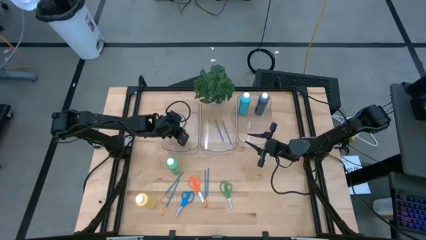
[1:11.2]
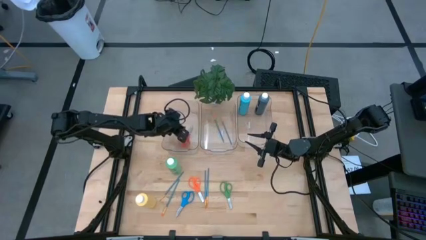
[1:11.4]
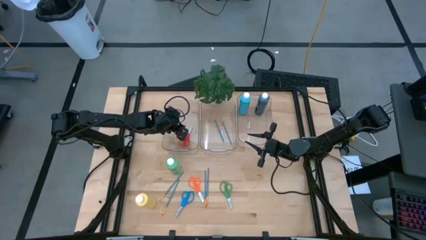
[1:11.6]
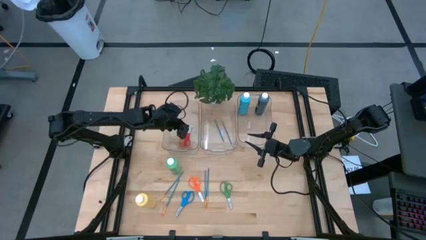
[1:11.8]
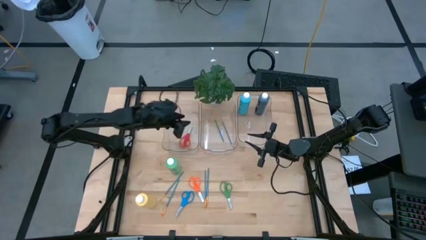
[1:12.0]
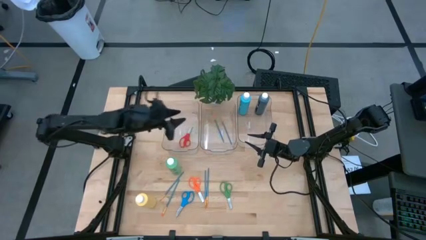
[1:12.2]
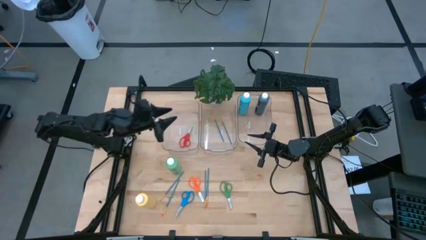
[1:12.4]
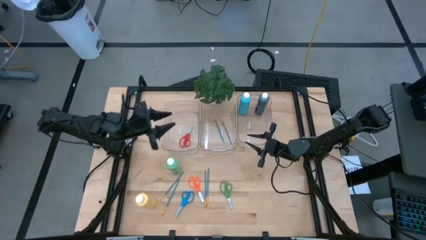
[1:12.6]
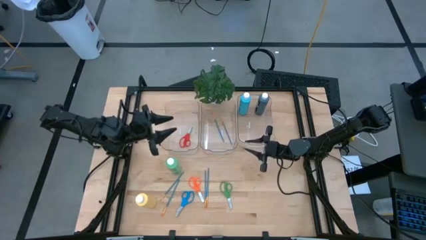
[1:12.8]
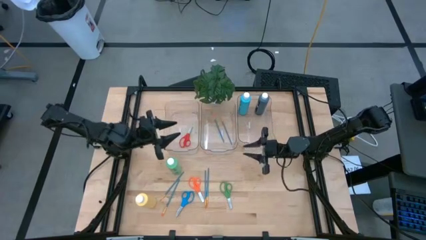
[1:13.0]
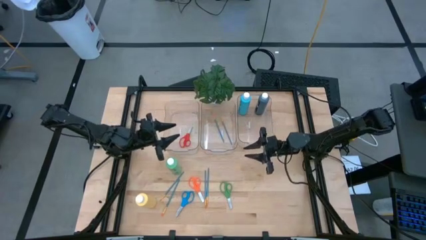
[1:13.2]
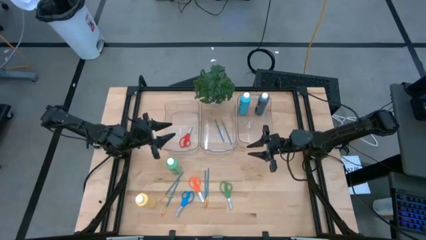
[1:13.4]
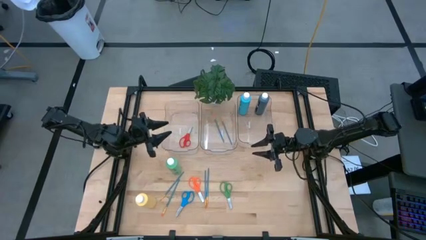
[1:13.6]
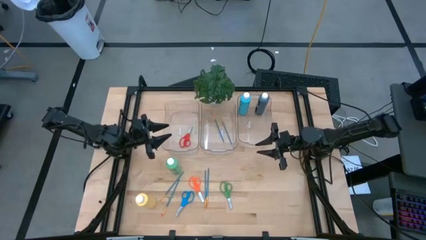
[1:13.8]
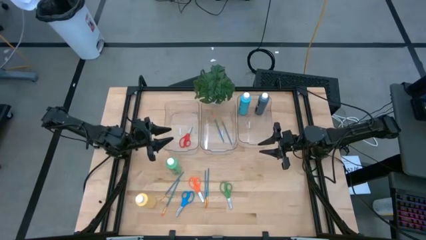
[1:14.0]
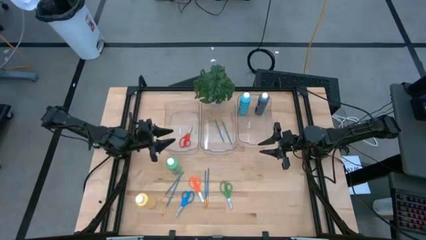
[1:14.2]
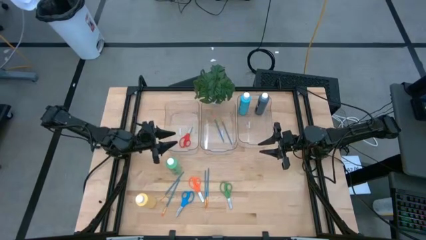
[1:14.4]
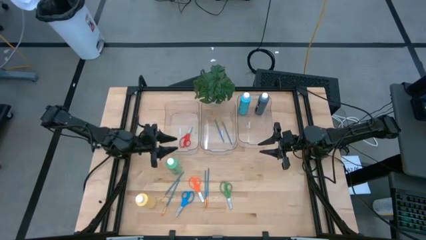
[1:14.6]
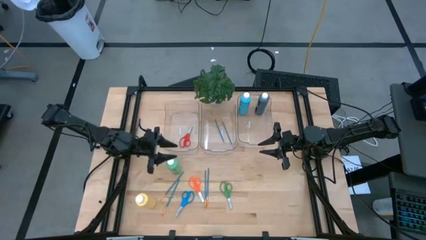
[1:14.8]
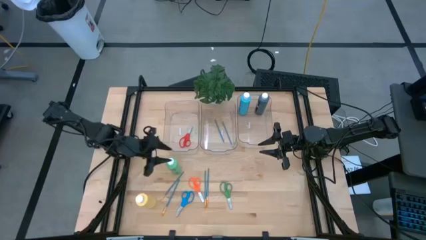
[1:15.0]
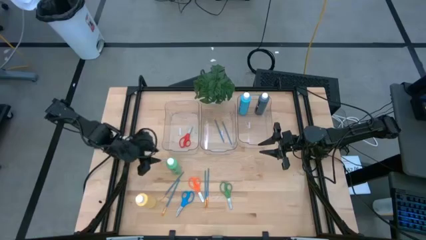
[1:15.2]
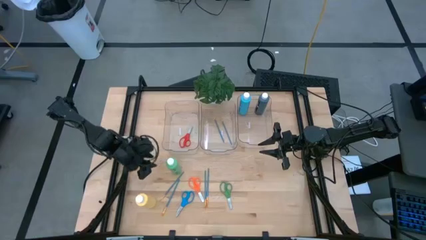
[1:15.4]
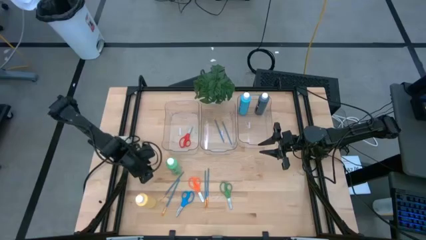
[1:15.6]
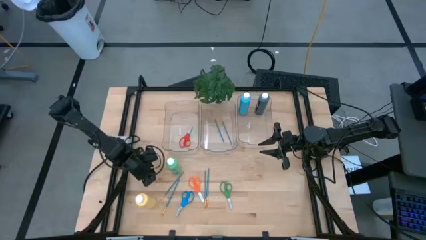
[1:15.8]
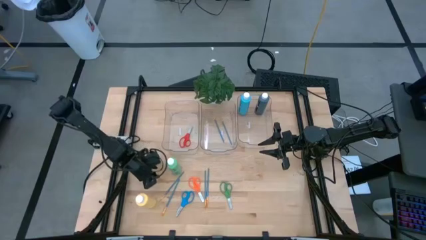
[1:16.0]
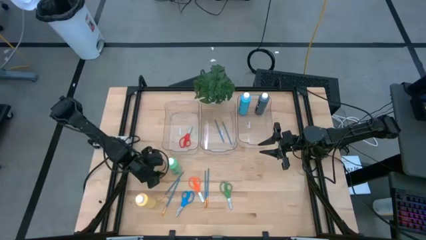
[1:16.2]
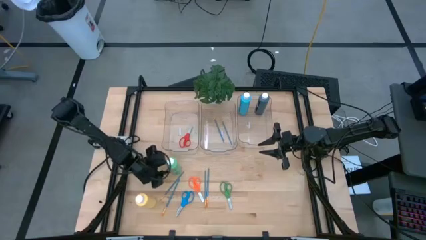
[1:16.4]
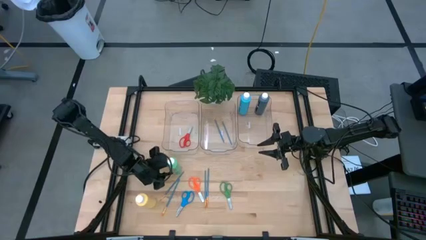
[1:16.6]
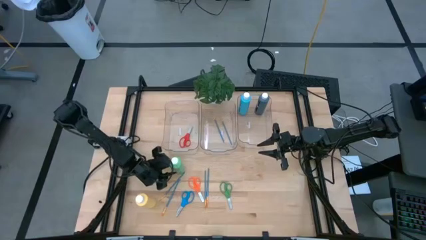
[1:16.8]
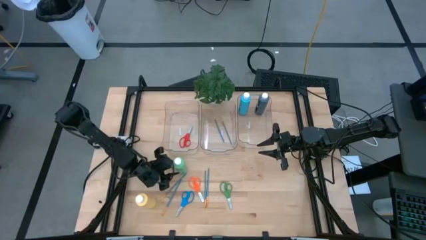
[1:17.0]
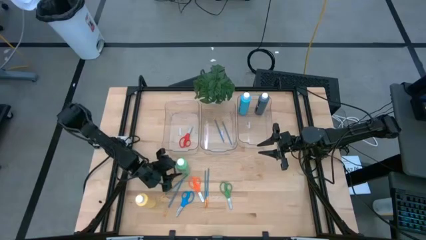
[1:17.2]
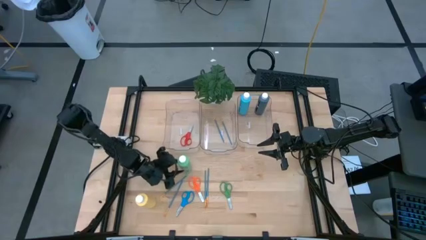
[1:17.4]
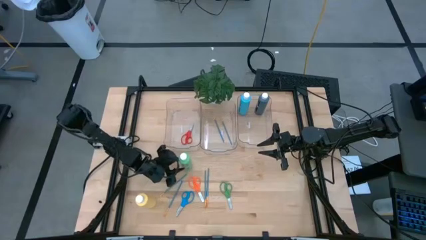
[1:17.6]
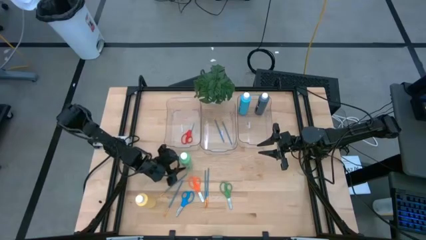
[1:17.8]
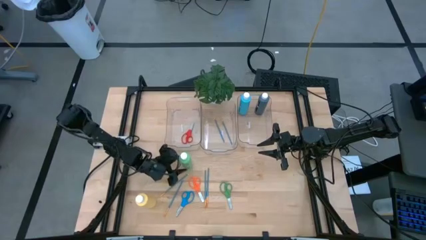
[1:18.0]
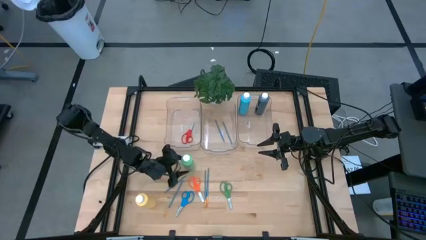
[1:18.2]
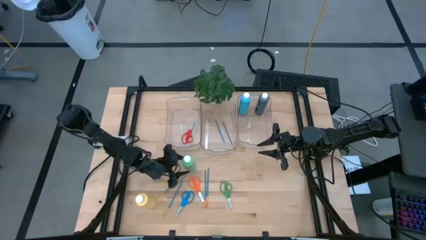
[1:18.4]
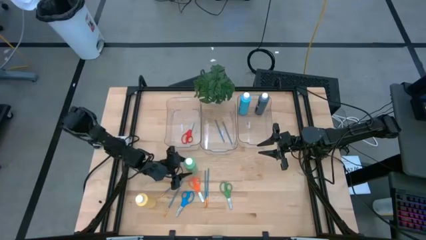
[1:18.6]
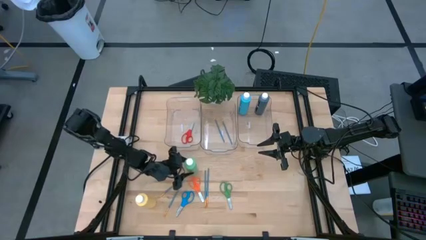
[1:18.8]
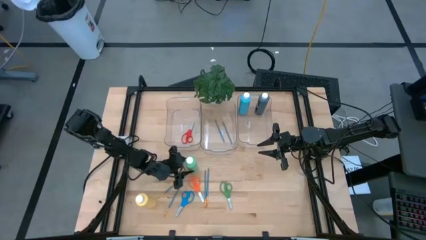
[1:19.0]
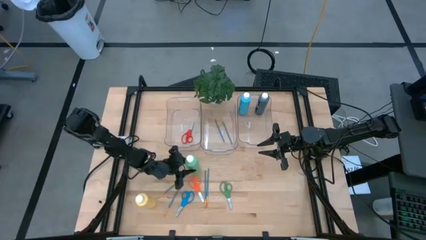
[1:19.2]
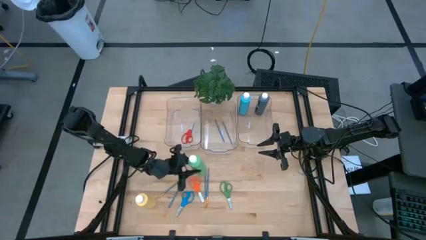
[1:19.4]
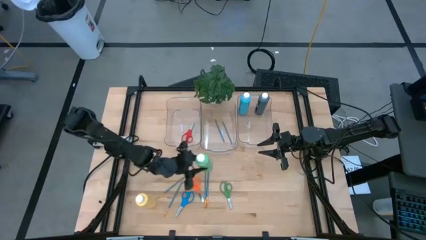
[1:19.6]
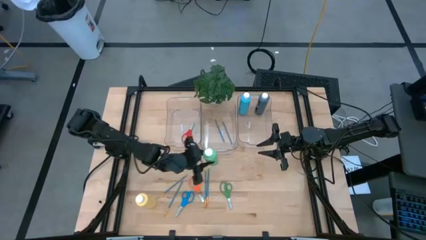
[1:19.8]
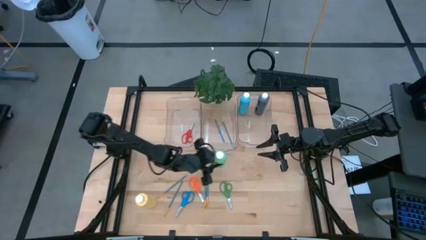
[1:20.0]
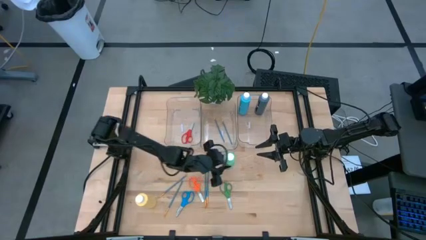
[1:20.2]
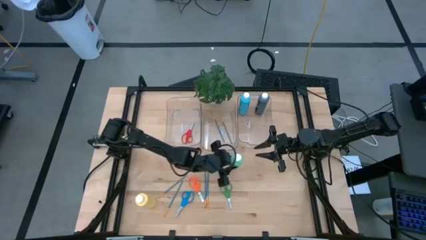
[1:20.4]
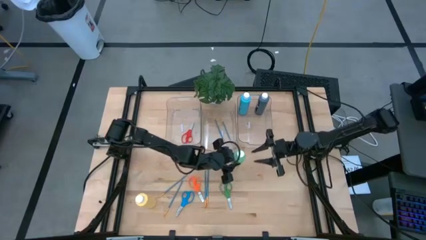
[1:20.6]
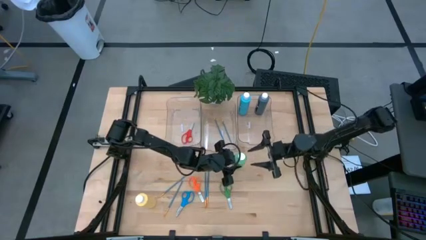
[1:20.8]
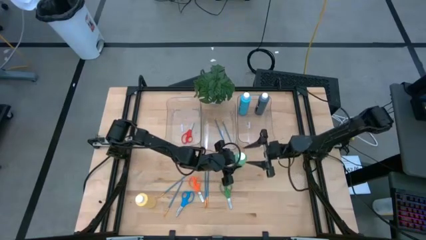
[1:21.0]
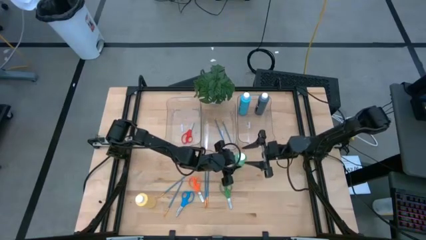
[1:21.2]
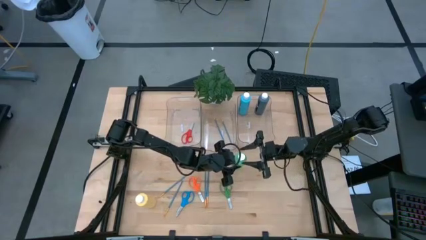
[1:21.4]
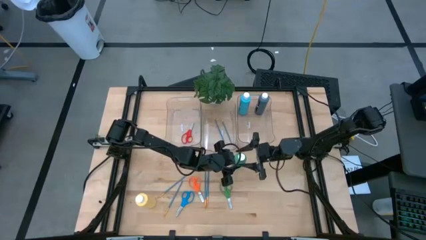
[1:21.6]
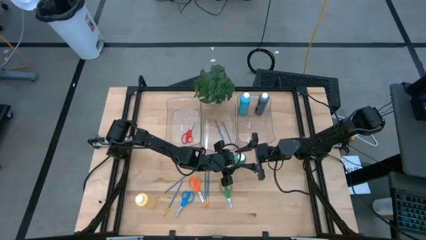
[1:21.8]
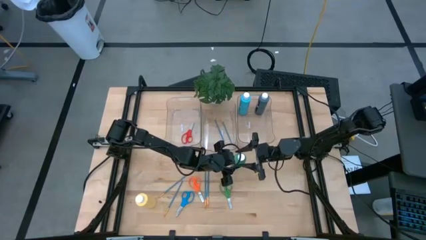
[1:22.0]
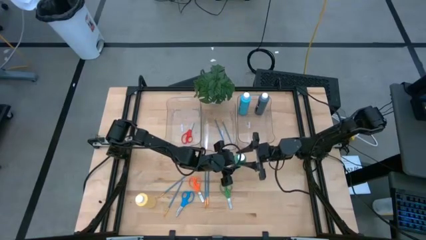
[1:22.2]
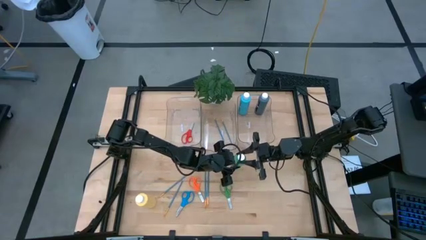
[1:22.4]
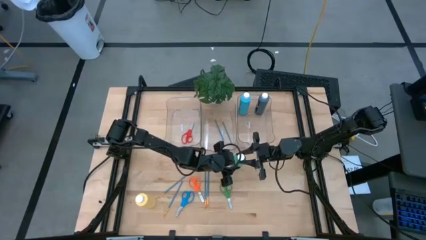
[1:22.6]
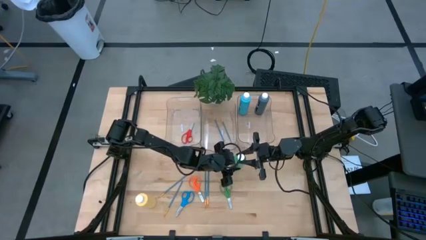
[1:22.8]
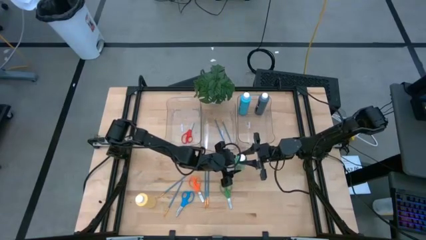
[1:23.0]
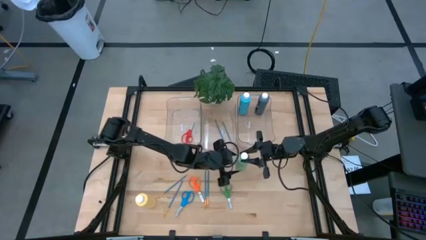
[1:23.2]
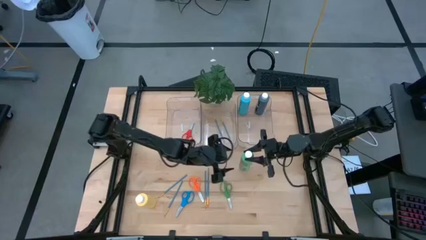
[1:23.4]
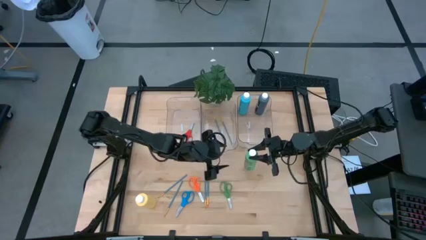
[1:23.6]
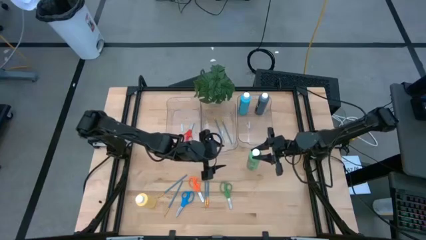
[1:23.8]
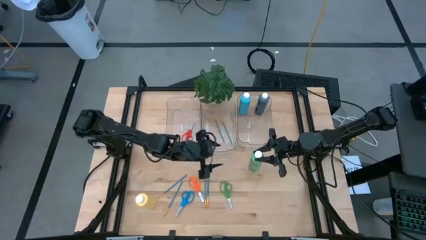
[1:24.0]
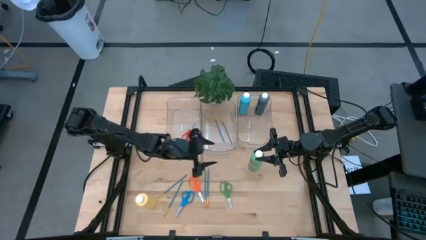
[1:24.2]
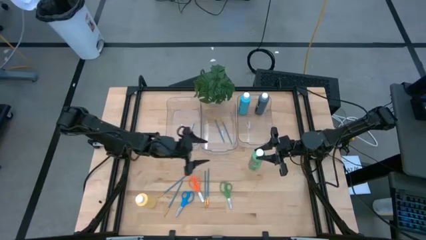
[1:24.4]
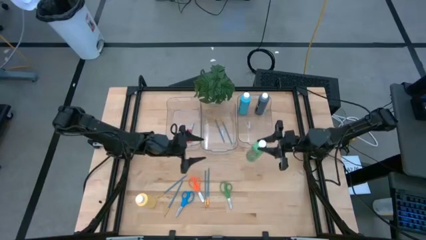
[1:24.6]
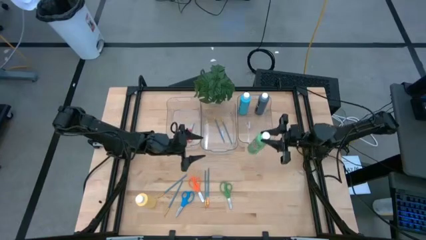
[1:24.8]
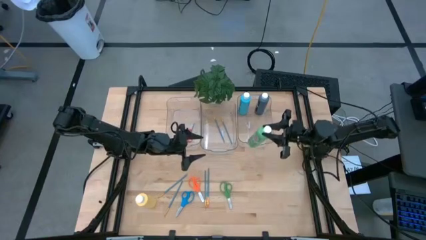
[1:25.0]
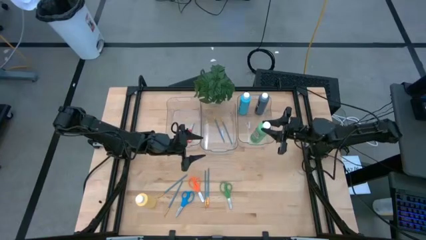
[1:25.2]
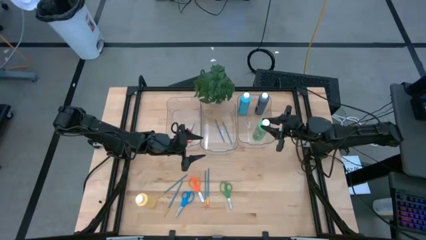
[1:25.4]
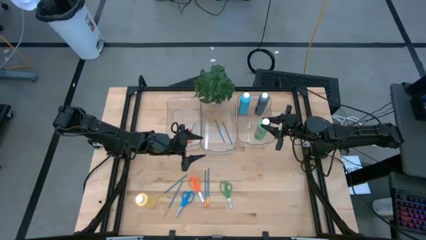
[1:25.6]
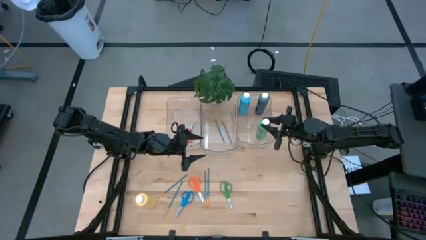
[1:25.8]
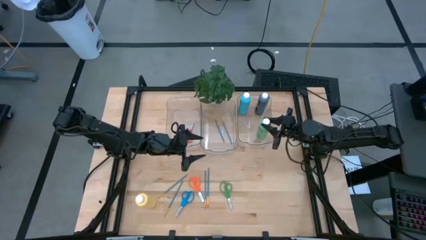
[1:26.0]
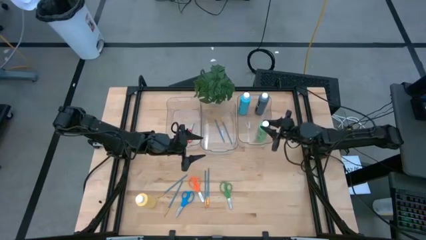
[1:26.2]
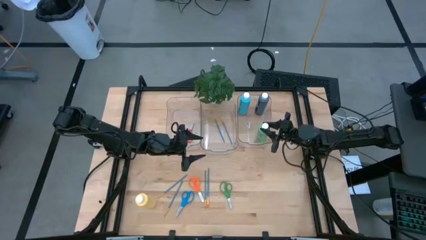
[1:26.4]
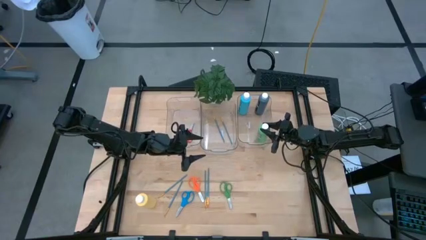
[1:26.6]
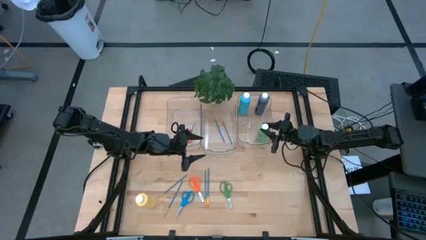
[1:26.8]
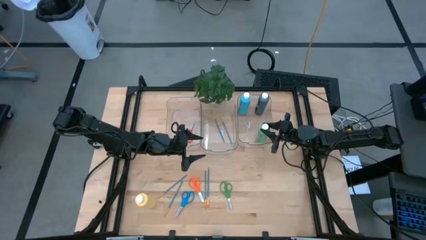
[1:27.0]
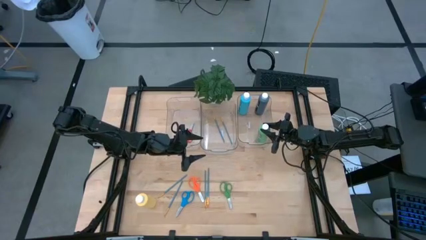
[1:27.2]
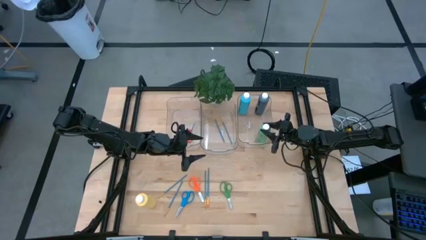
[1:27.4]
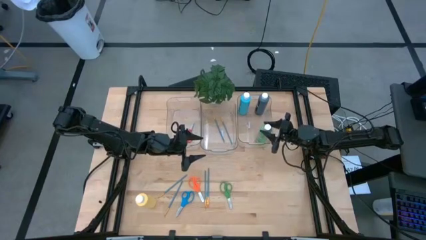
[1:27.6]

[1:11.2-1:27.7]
Task: Pick & Place Paint Supplies
Put the green paint bottle into the right transparent bin

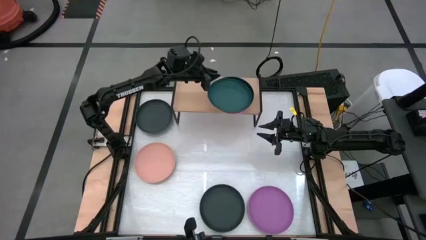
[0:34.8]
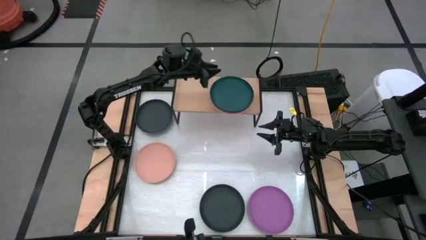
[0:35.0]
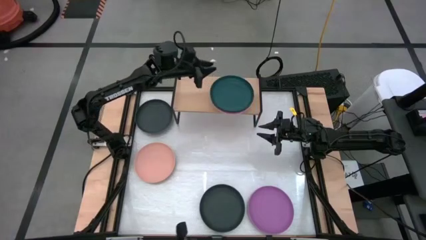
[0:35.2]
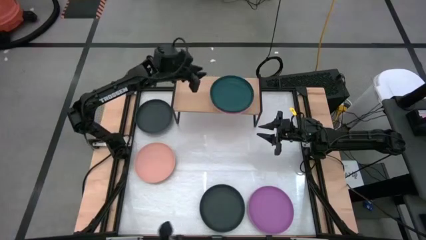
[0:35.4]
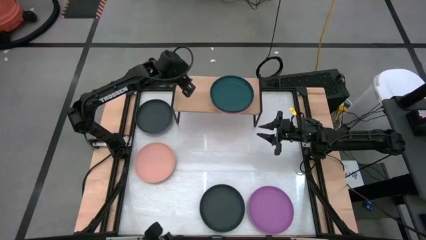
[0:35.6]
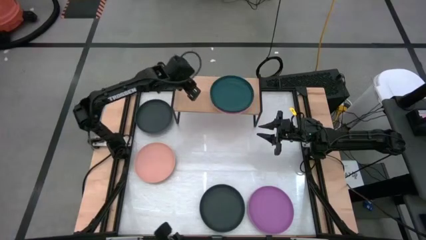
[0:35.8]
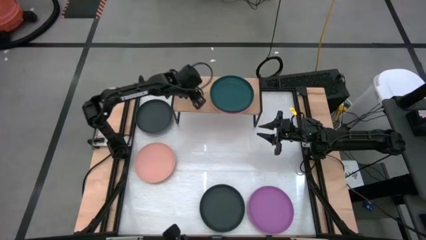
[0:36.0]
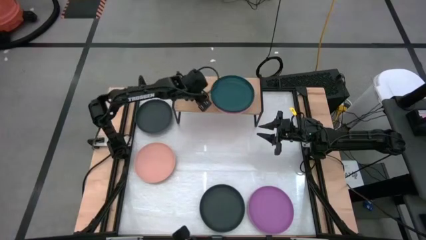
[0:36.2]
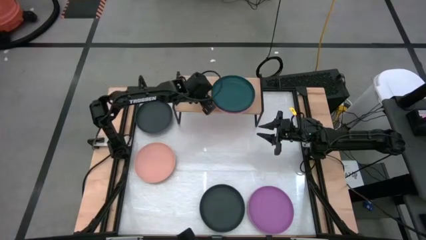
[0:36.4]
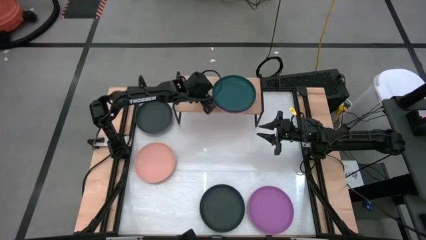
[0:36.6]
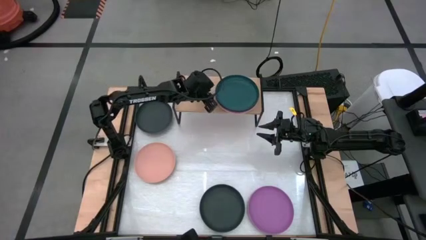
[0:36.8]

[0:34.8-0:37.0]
Task: Place and stack plates onto a shelf
Adjust the stacked plates on the shelf
